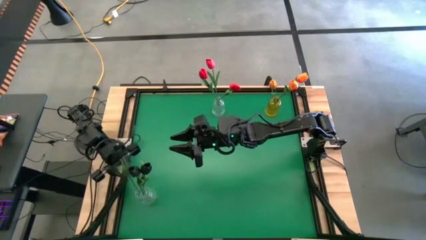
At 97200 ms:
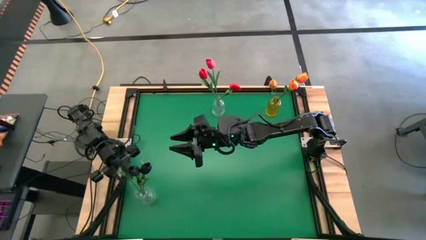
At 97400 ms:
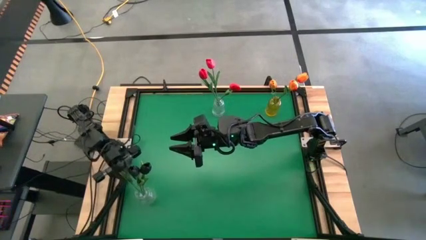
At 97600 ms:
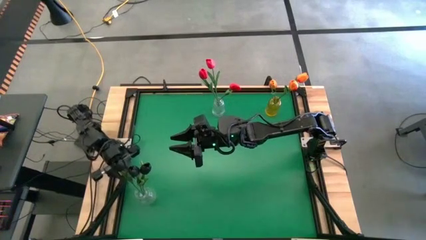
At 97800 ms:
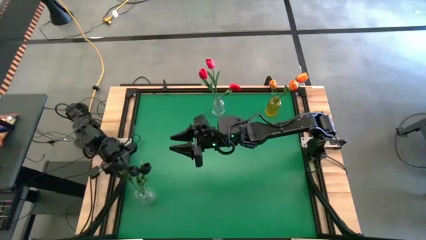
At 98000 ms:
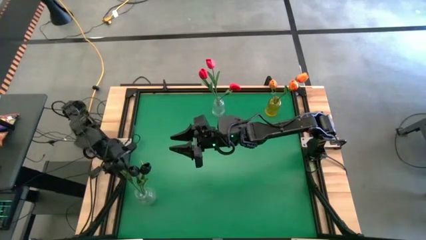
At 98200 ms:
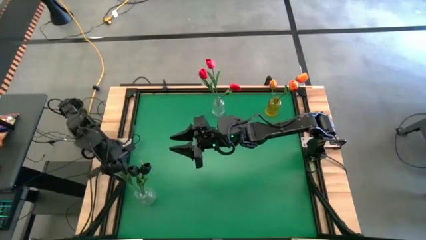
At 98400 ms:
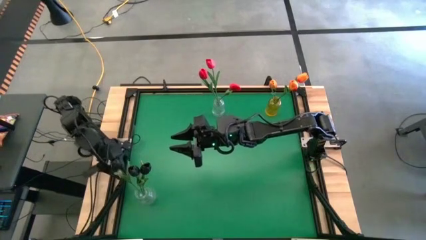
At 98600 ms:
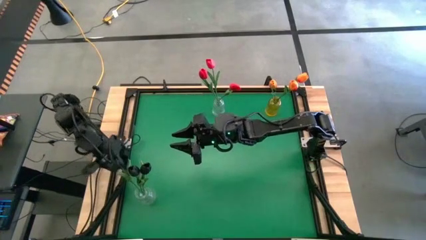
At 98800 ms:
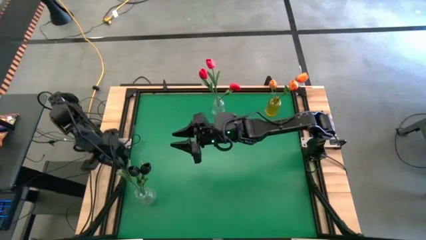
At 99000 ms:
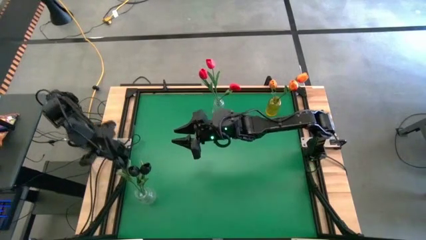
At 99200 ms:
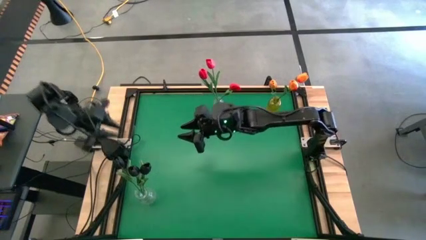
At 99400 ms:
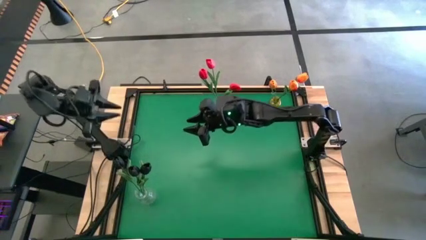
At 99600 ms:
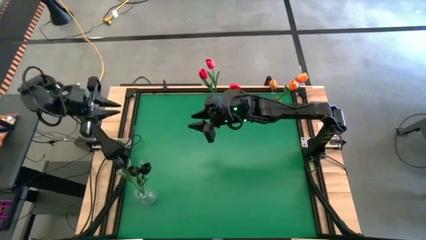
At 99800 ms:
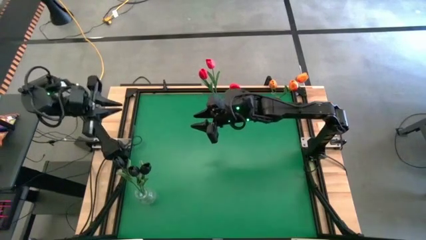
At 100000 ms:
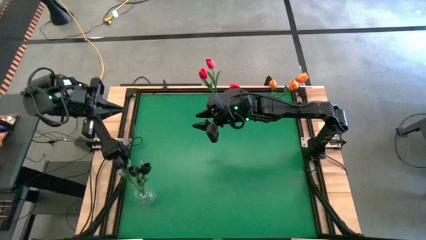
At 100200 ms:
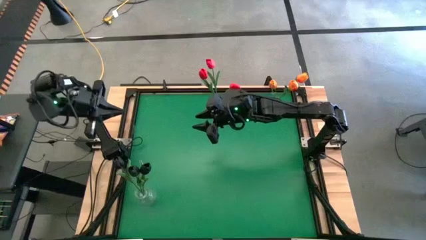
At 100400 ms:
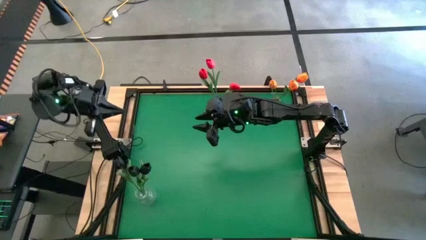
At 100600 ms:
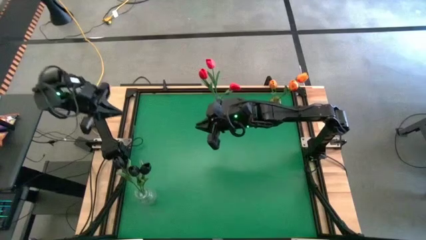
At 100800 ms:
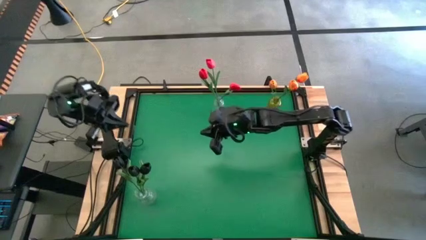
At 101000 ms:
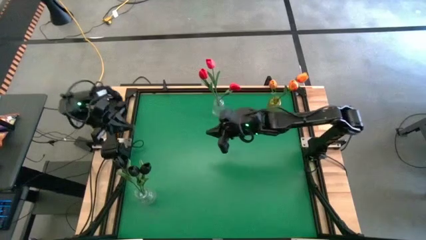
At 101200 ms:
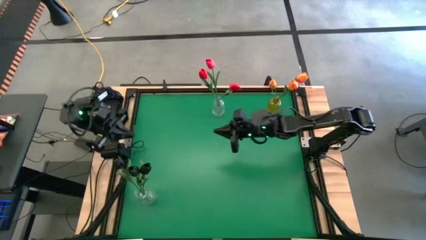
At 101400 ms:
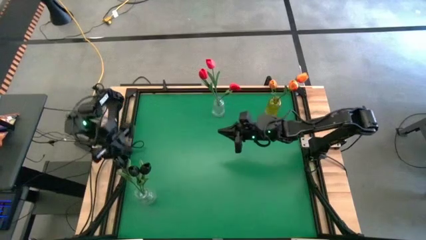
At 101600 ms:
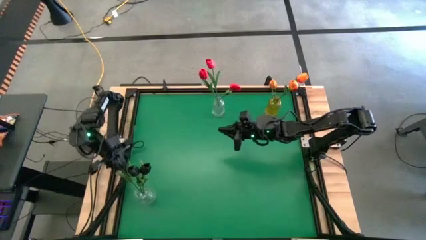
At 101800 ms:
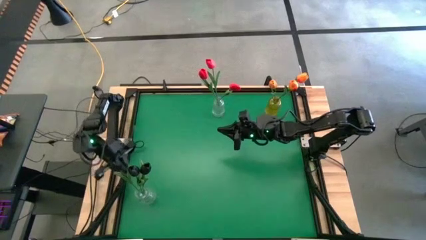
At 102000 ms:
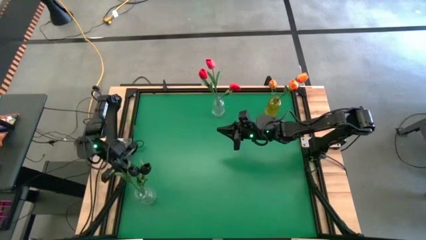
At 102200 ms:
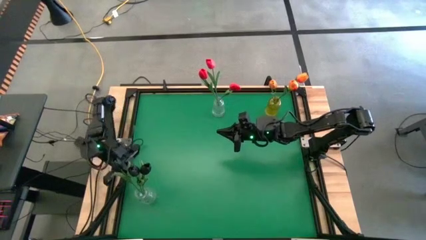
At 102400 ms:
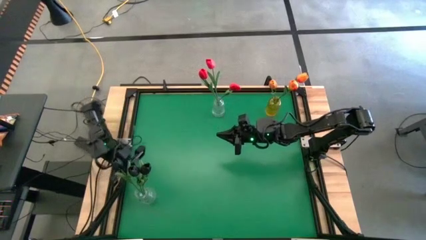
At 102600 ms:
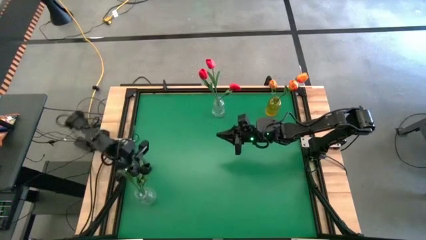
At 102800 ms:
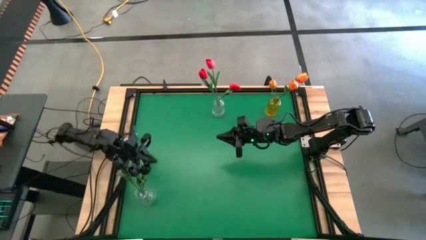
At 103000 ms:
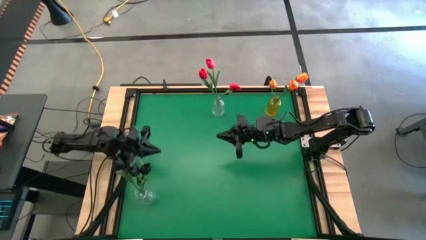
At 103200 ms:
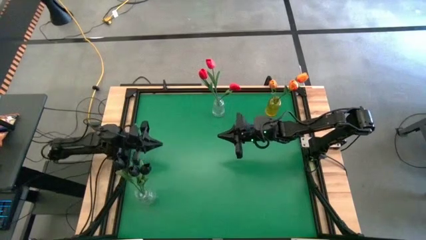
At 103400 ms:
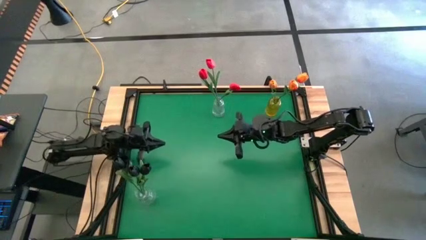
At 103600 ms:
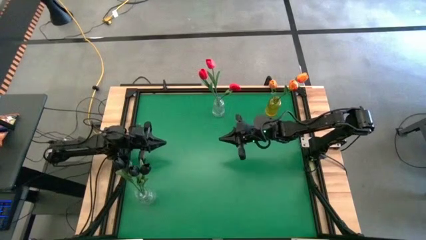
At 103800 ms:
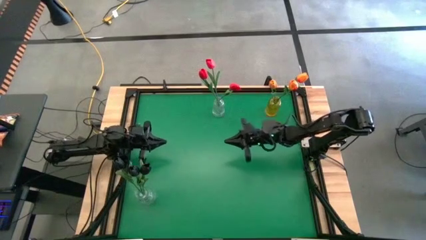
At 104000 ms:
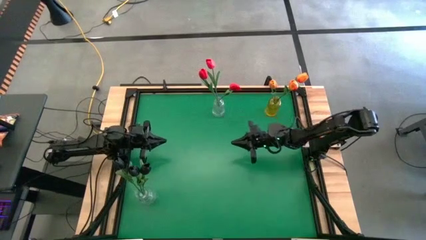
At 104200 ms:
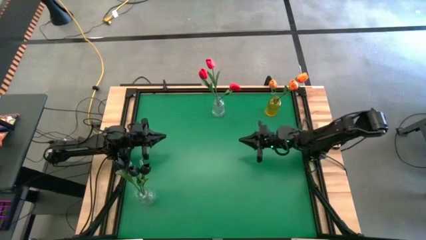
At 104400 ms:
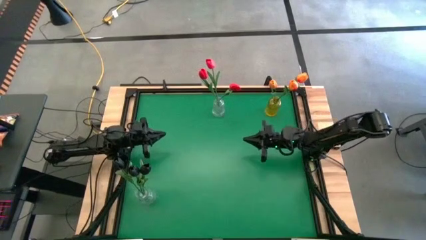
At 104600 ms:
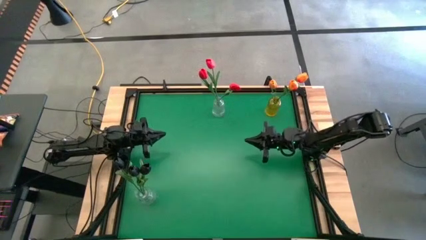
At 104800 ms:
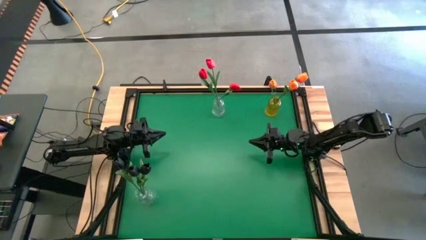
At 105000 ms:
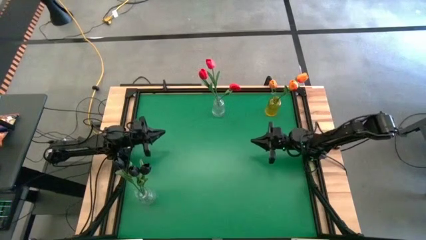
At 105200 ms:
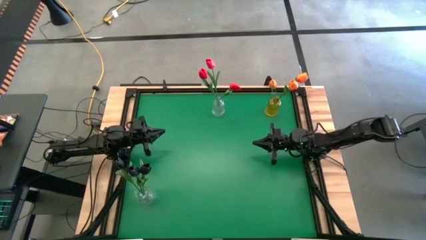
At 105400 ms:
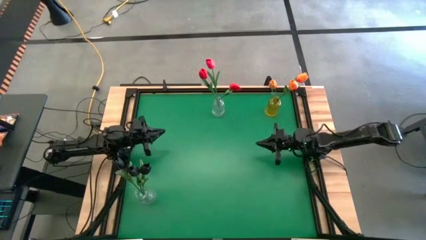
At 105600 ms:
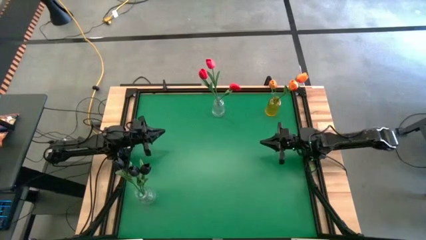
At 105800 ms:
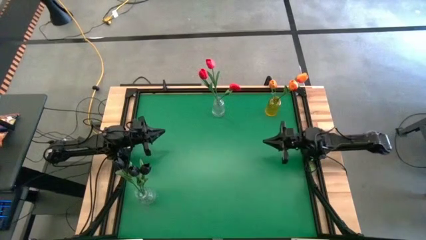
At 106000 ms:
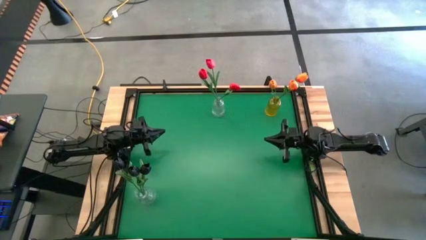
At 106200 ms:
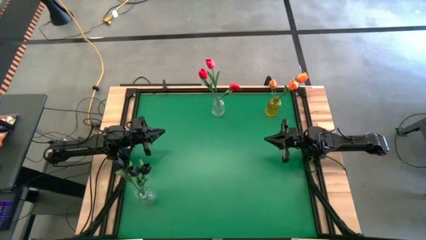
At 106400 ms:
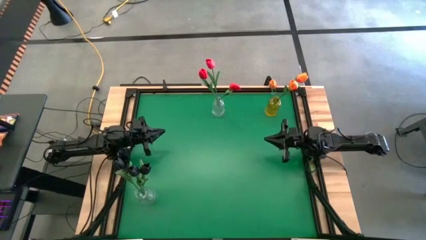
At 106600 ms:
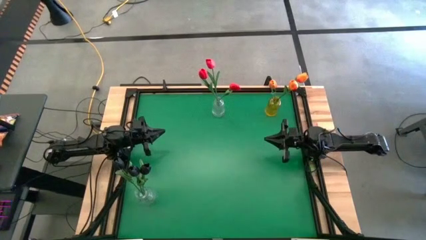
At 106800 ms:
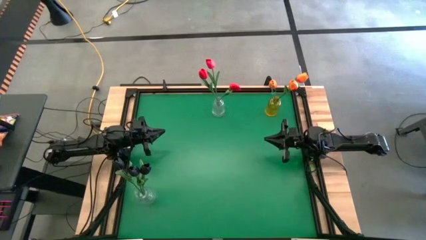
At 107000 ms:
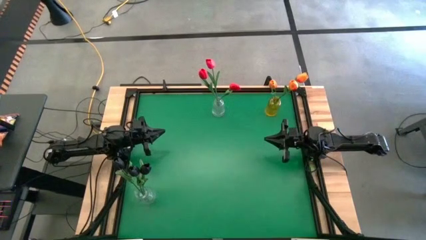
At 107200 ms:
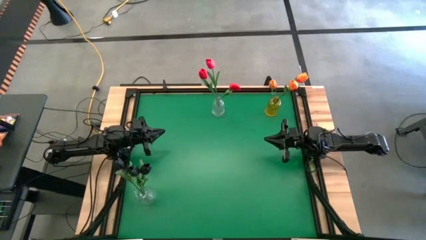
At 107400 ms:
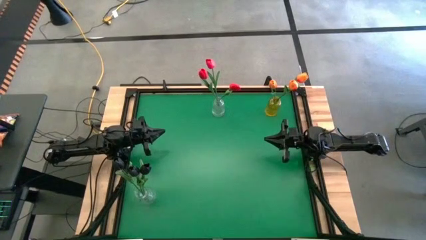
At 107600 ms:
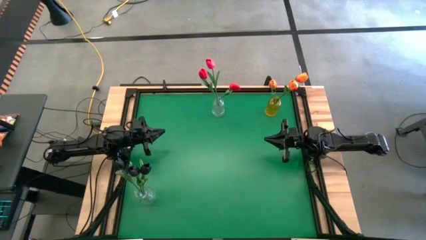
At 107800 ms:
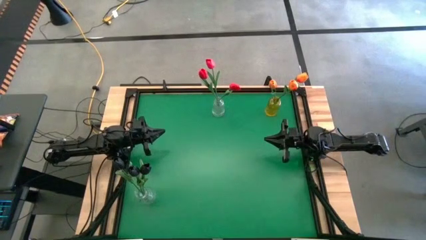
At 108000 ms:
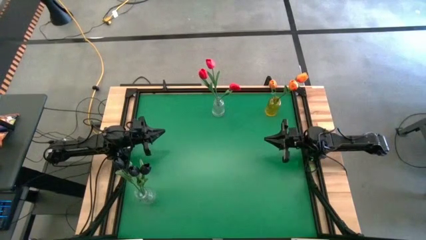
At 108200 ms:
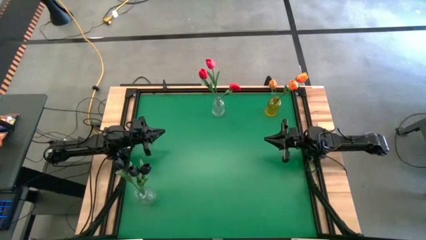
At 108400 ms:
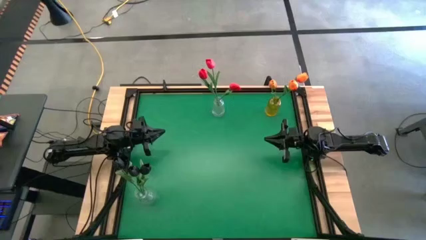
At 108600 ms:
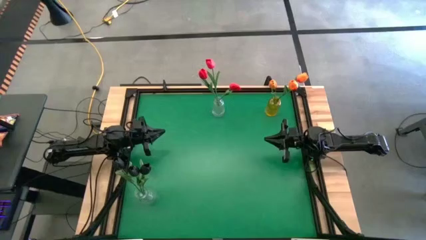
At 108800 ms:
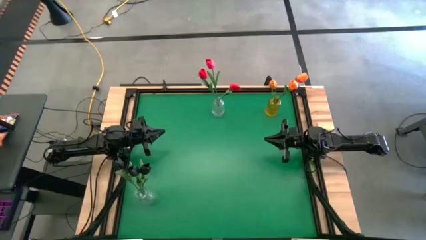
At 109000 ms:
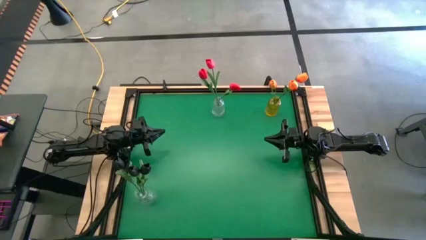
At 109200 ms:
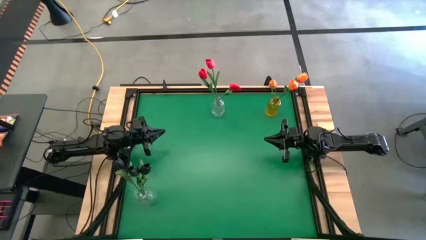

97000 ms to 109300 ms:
Task: Sort flowers into vase by color
Return to Home Position
